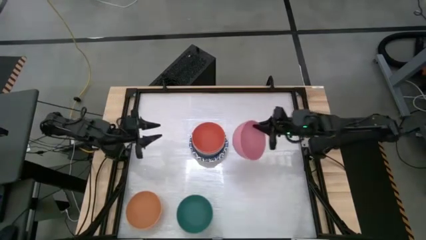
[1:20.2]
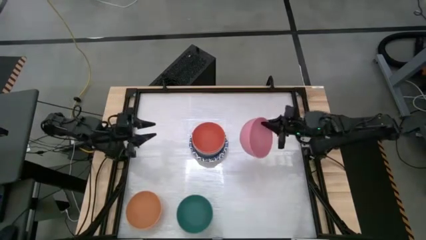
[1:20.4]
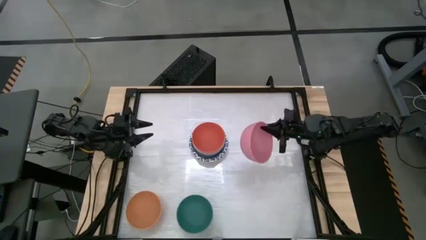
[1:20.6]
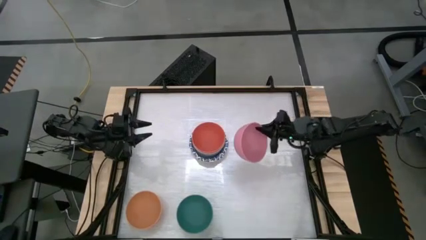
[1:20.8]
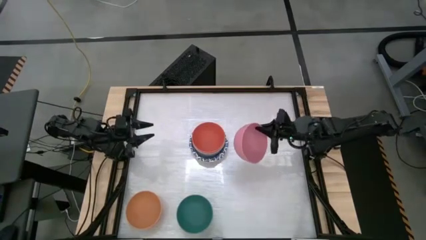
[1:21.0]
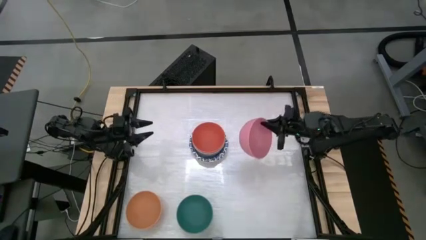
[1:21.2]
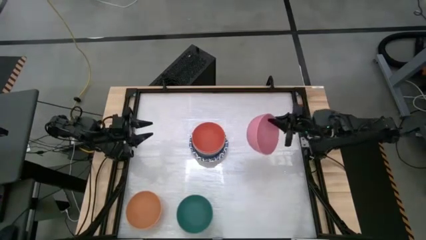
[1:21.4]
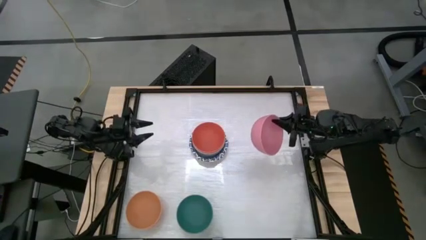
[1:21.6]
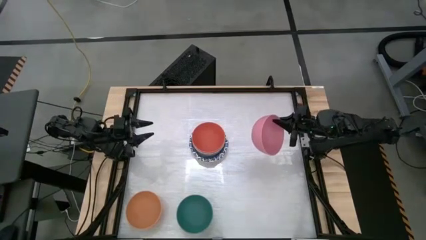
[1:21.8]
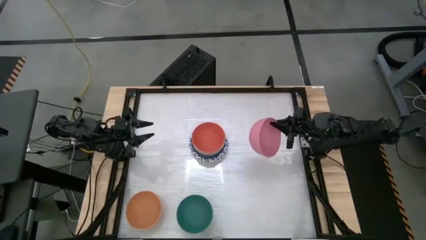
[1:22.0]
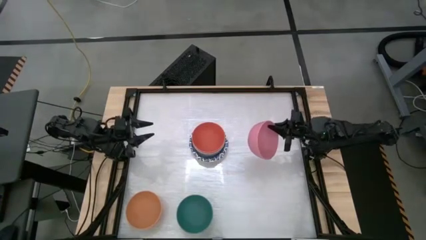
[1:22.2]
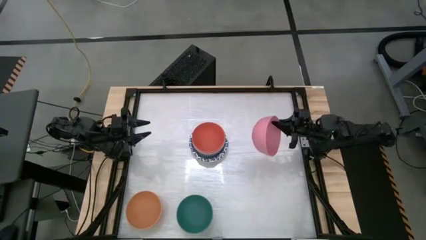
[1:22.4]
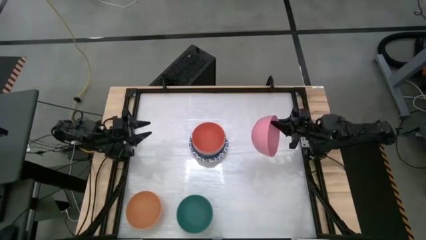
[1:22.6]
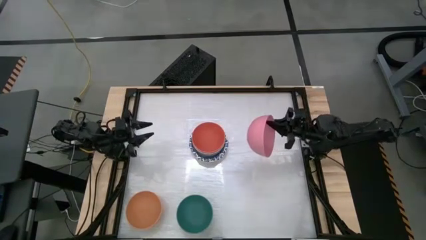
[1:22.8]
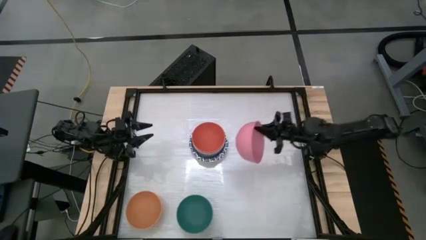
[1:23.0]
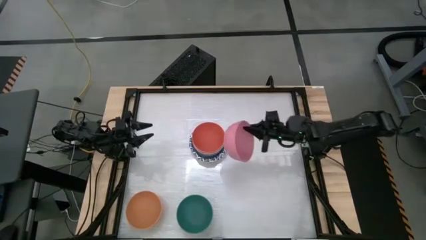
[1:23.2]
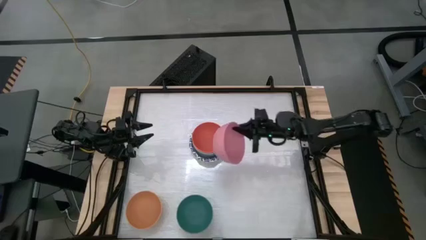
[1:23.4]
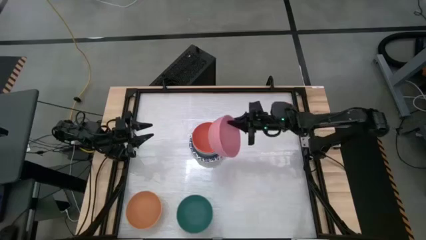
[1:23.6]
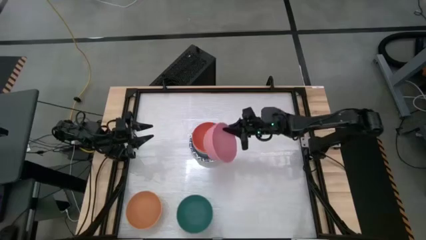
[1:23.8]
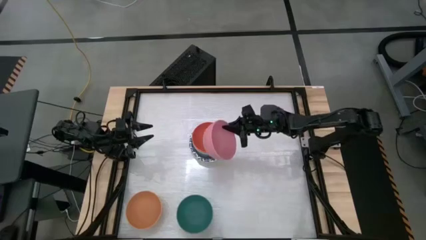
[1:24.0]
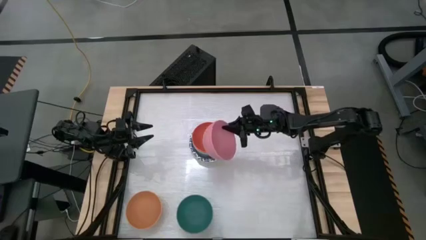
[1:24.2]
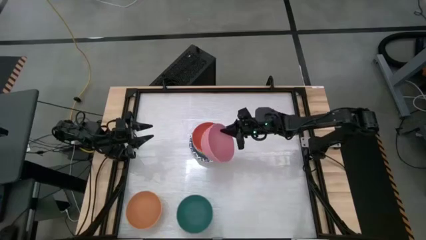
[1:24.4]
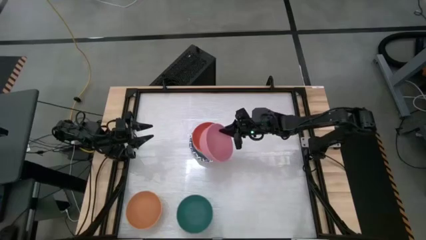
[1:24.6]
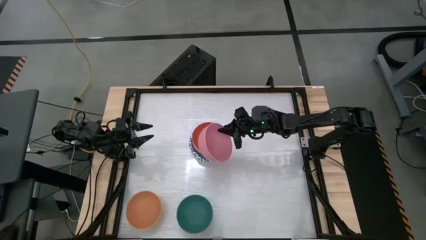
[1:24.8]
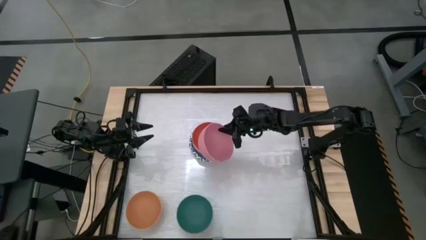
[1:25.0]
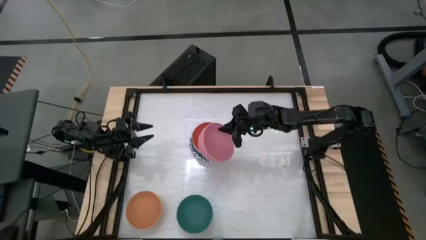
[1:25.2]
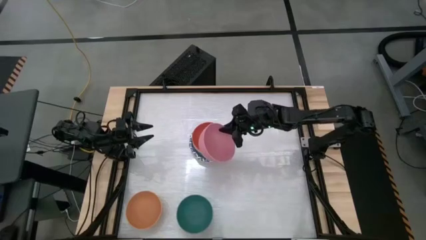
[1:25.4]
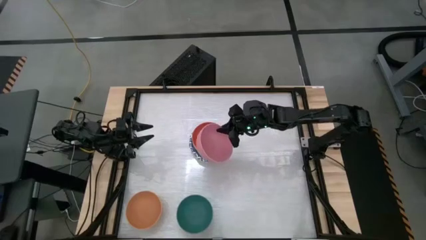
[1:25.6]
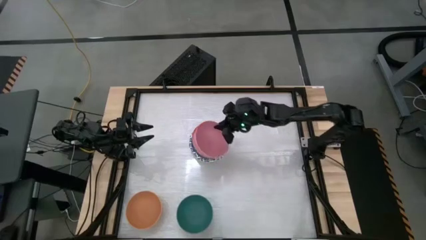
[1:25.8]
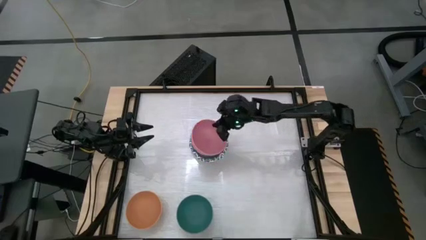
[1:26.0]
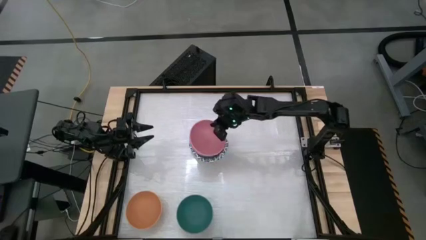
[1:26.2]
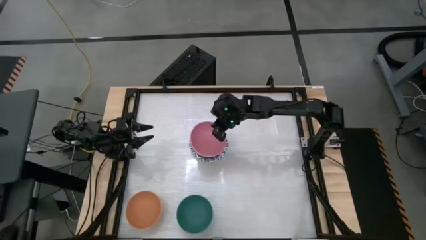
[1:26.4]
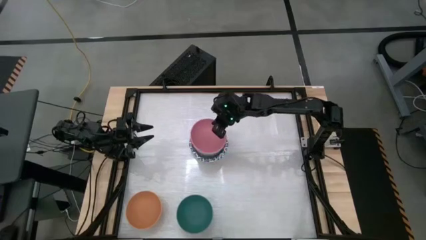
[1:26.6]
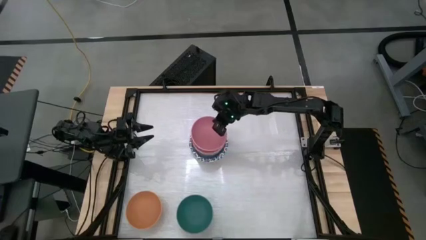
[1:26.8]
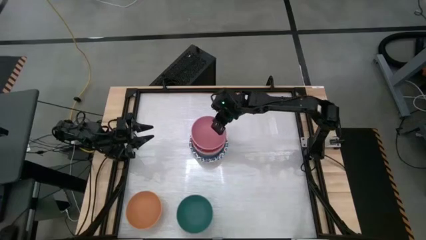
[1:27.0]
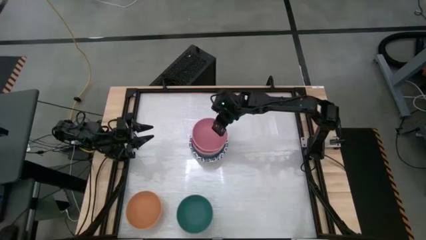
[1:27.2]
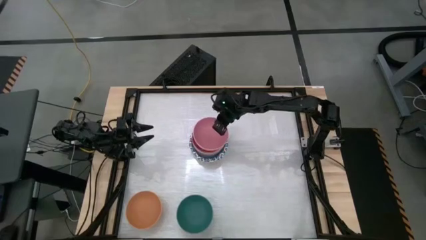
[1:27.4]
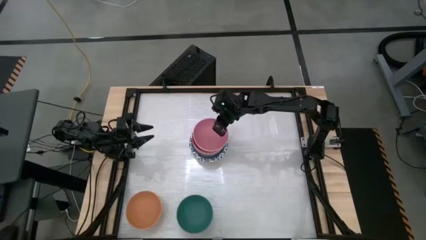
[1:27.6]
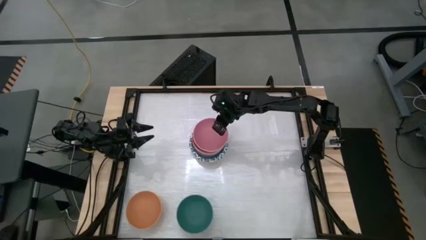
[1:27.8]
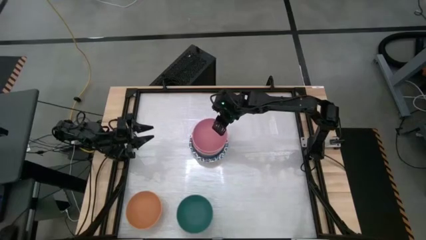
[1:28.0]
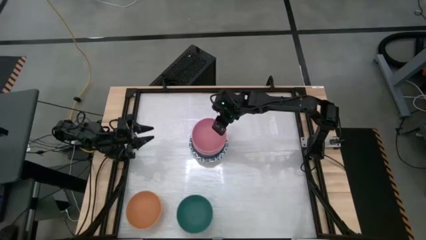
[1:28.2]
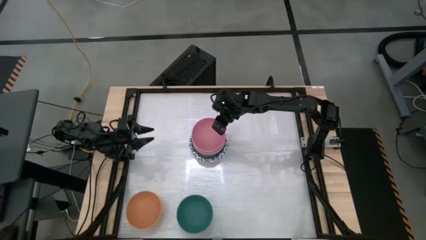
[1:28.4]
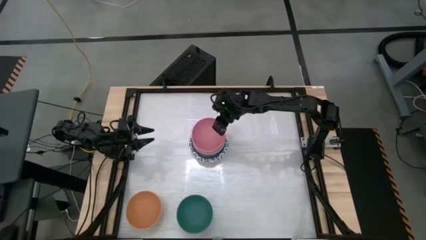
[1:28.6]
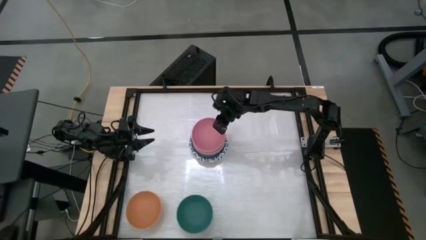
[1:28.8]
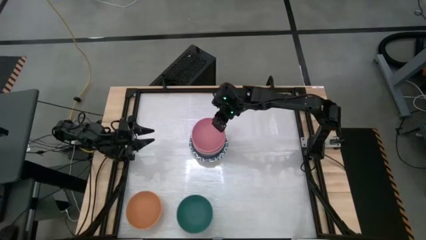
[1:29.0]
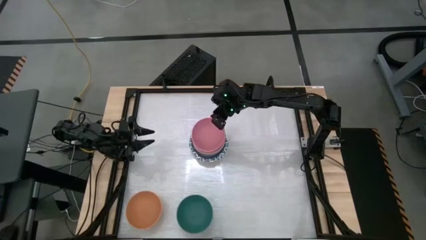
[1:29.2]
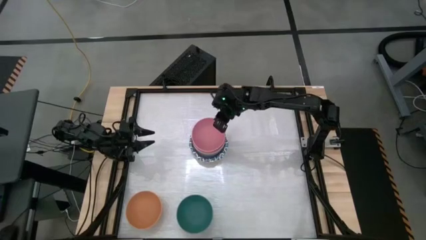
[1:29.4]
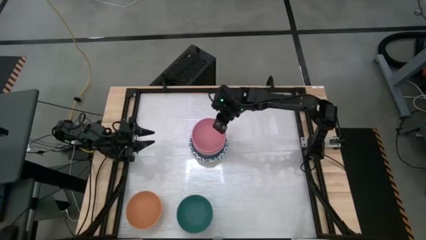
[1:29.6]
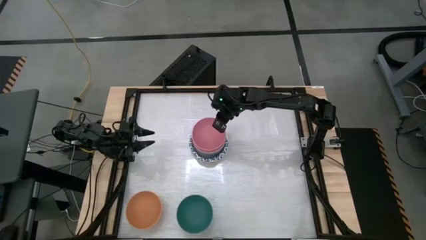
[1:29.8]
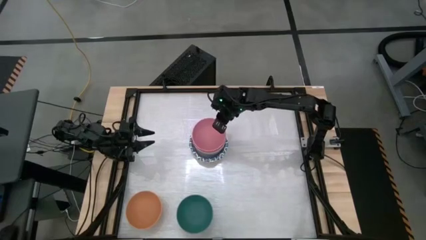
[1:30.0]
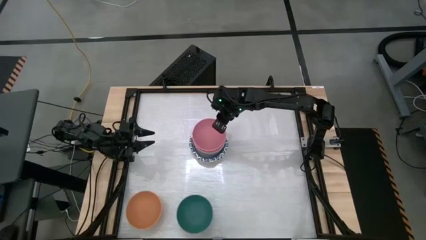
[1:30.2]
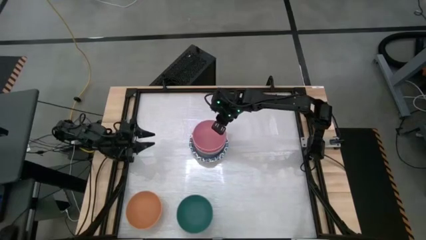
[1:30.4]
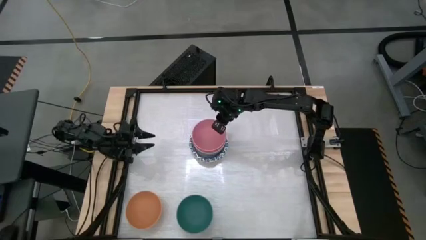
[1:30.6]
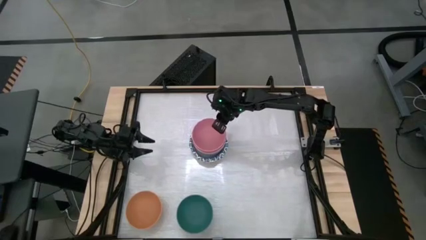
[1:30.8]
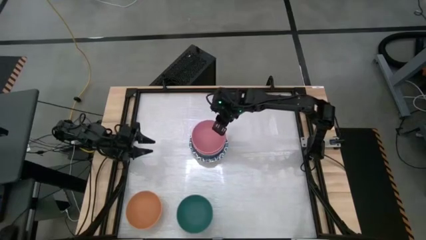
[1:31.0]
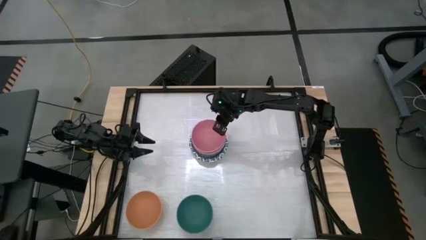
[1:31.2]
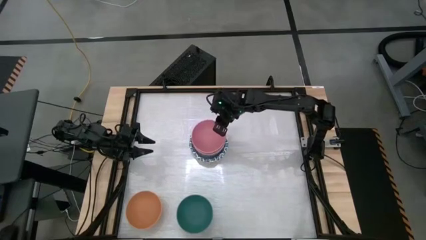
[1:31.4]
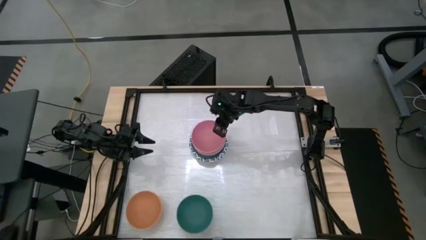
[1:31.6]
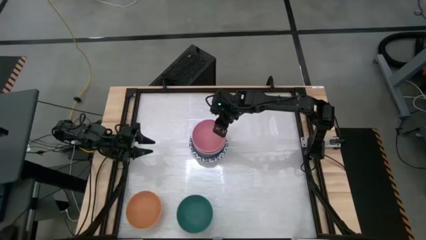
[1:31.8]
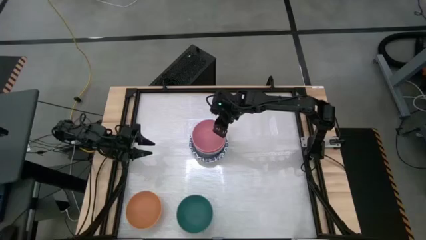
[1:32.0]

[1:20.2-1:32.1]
Stack the pink bowl on top of the orange bowl

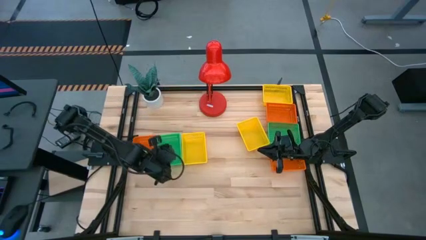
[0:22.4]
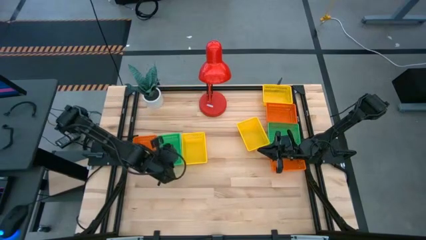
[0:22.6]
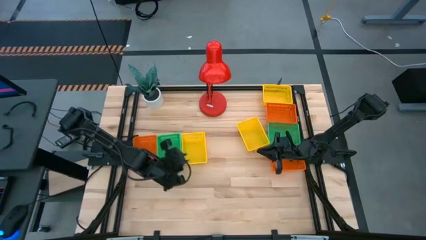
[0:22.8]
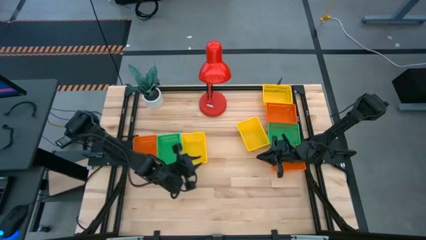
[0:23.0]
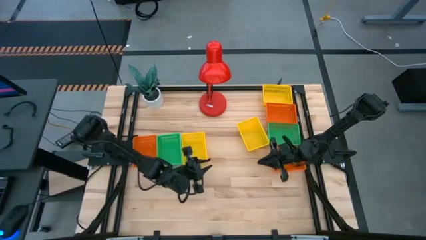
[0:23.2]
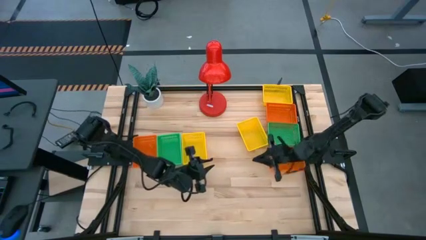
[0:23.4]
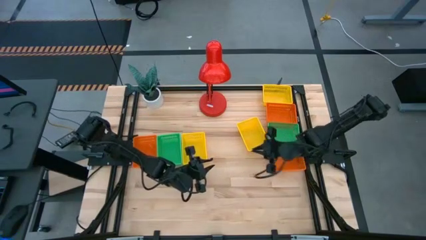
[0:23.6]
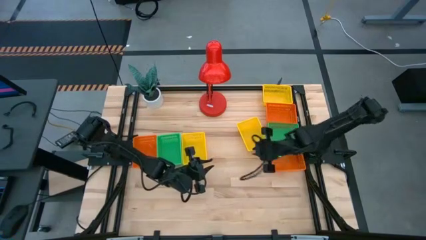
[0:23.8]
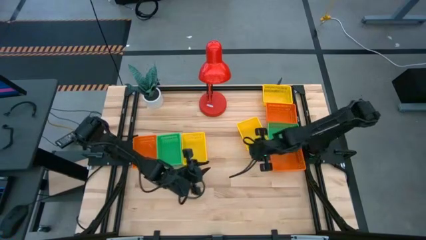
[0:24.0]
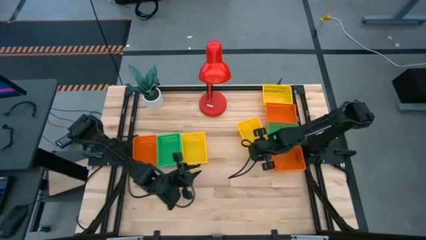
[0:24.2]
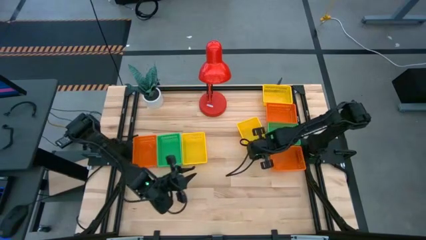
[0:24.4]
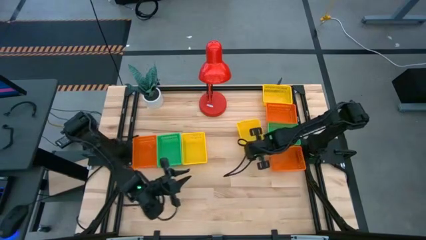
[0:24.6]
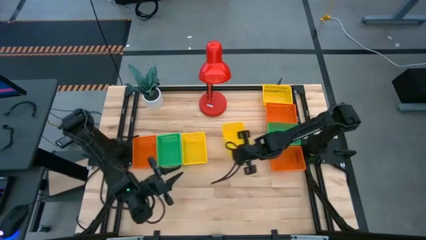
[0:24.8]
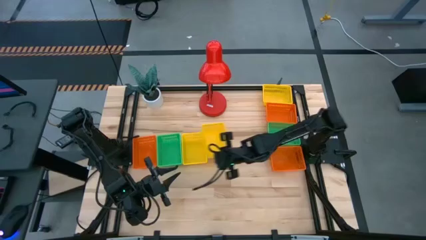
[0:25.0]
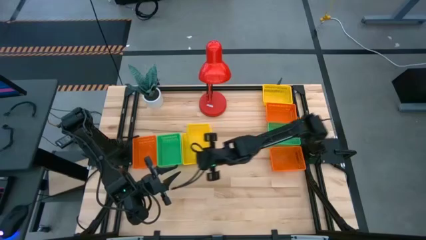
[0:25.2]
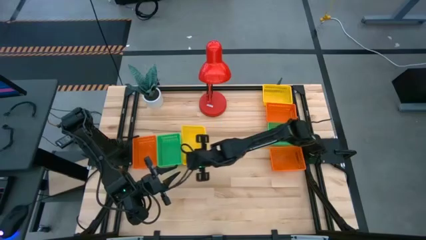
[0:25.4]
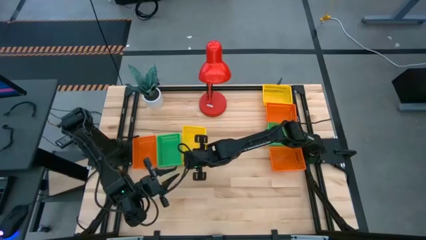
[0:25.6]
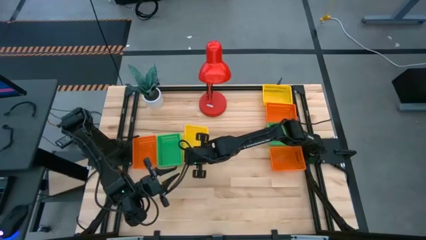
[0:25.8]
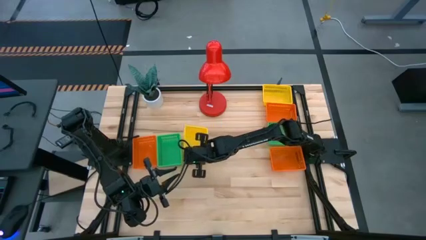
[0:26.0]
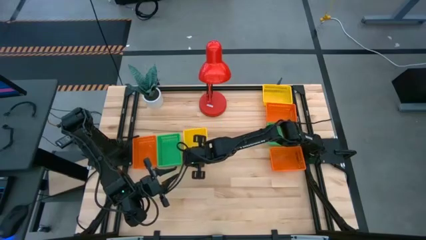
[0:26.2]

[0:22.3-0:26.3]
Stack the bottom right yellow bin on the left yellow bin
